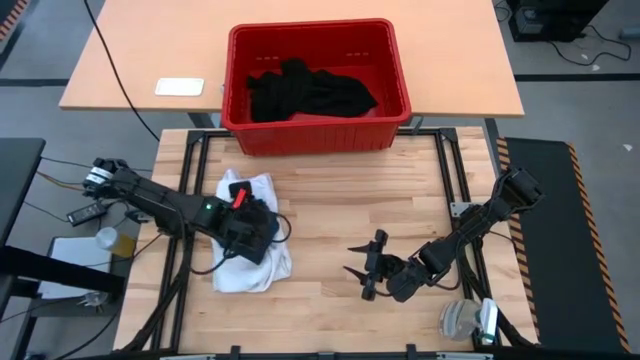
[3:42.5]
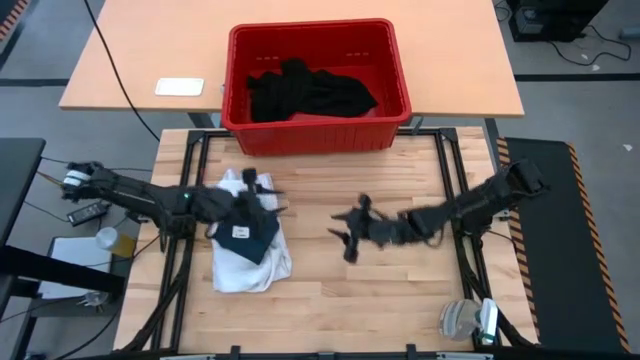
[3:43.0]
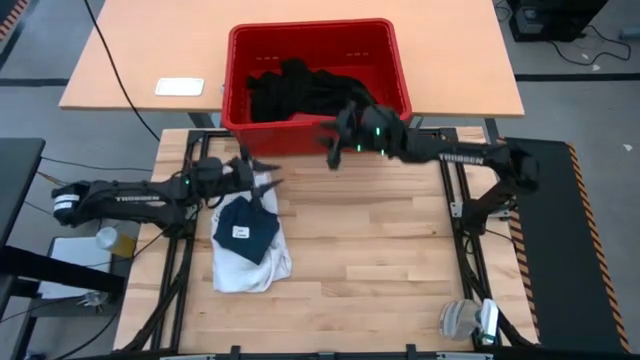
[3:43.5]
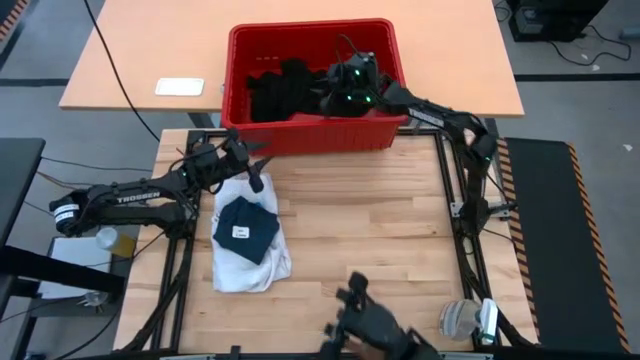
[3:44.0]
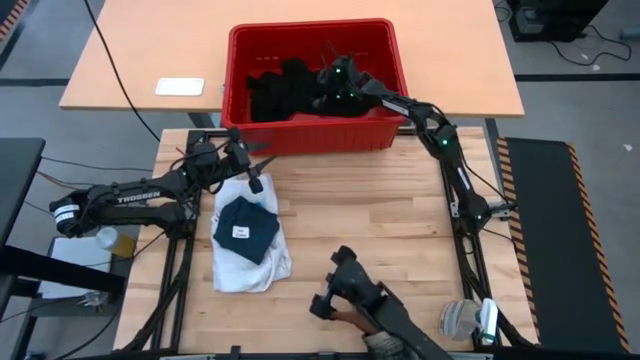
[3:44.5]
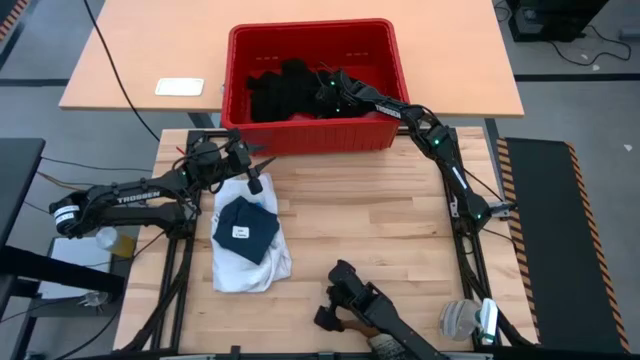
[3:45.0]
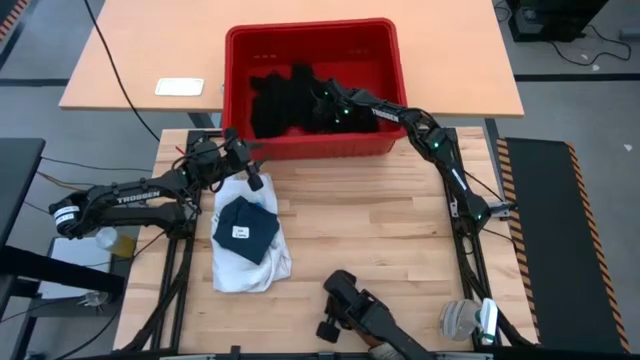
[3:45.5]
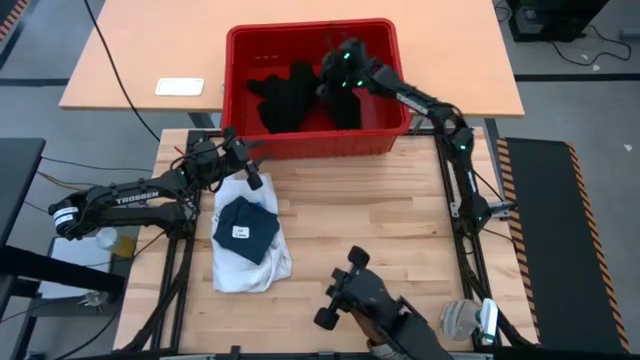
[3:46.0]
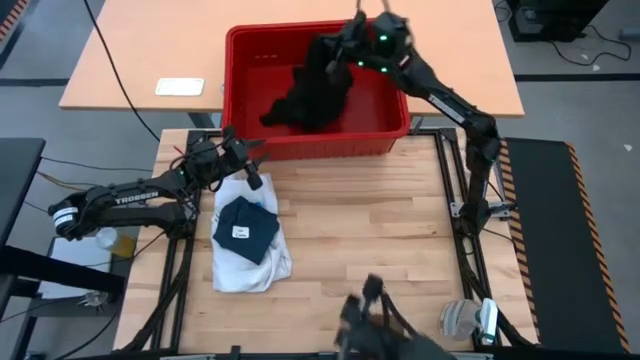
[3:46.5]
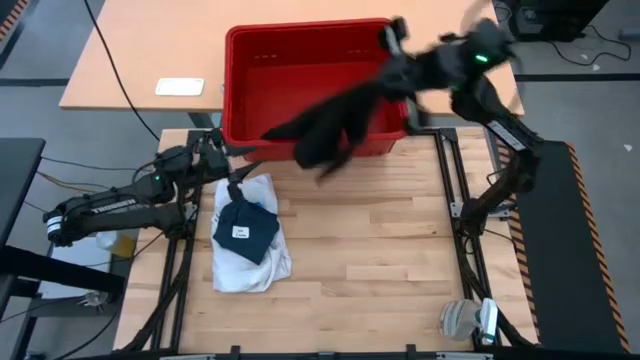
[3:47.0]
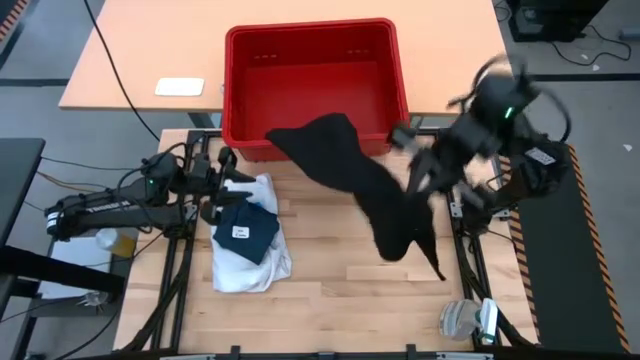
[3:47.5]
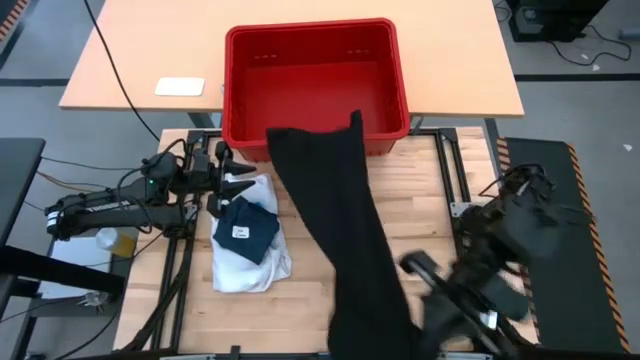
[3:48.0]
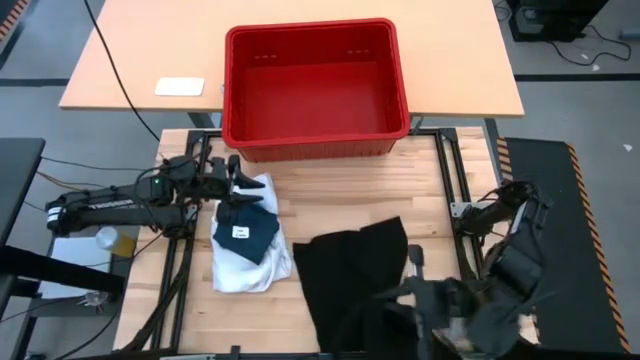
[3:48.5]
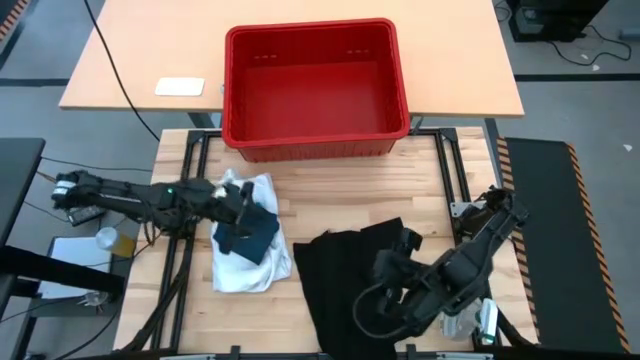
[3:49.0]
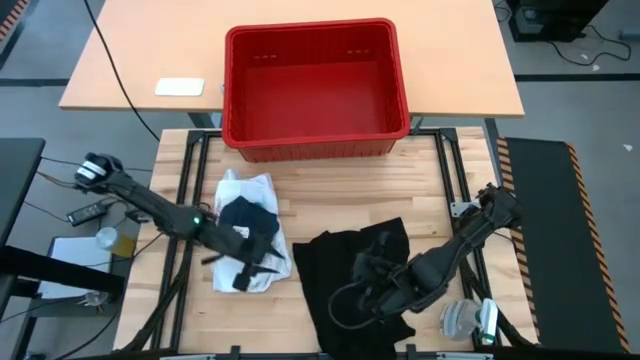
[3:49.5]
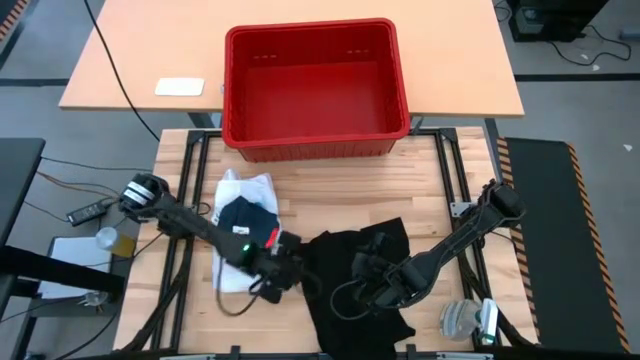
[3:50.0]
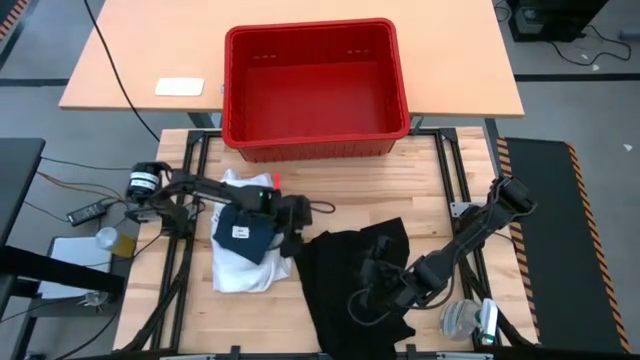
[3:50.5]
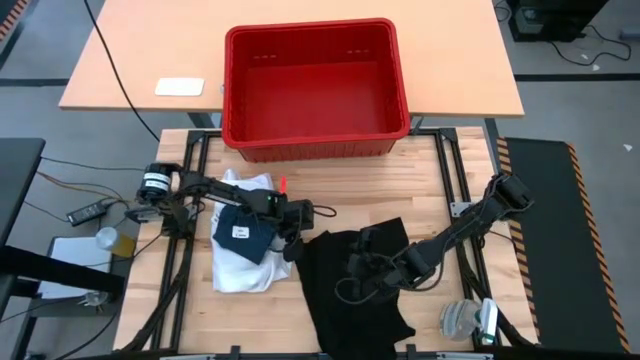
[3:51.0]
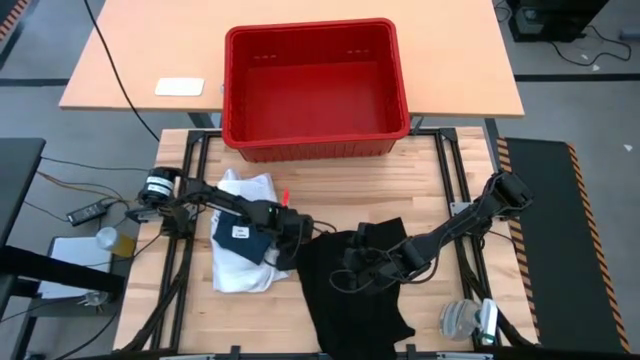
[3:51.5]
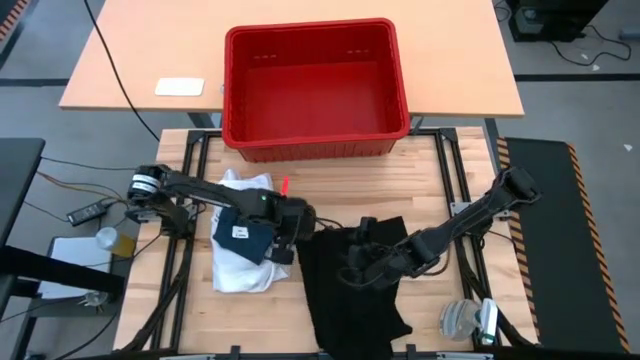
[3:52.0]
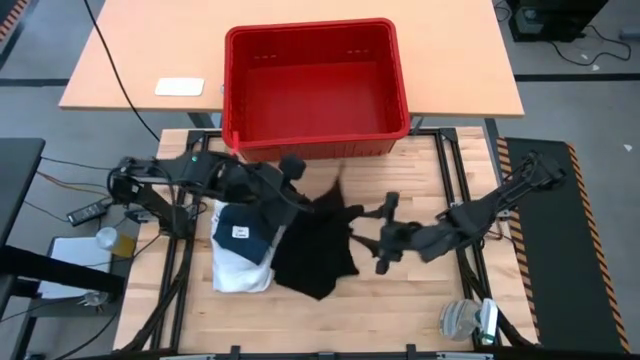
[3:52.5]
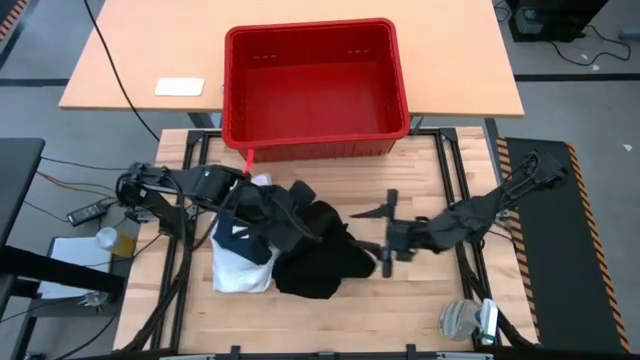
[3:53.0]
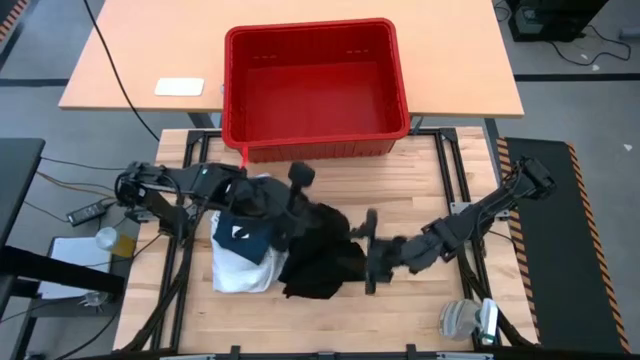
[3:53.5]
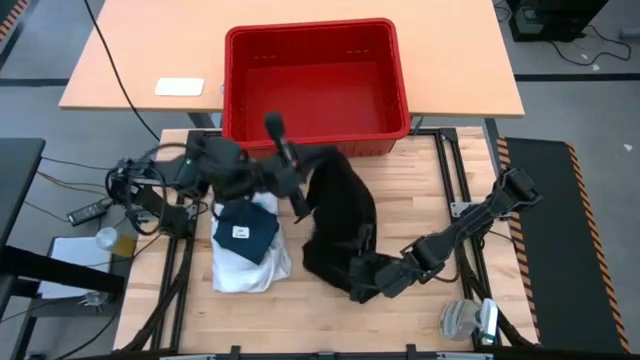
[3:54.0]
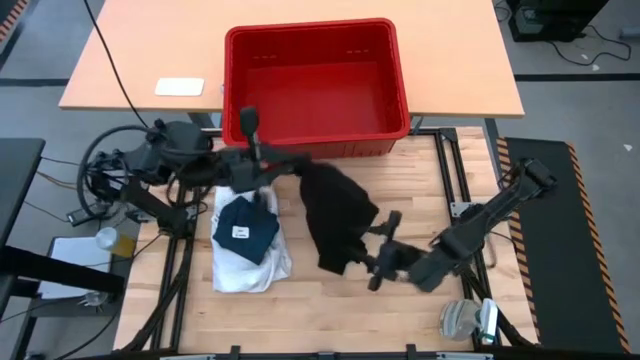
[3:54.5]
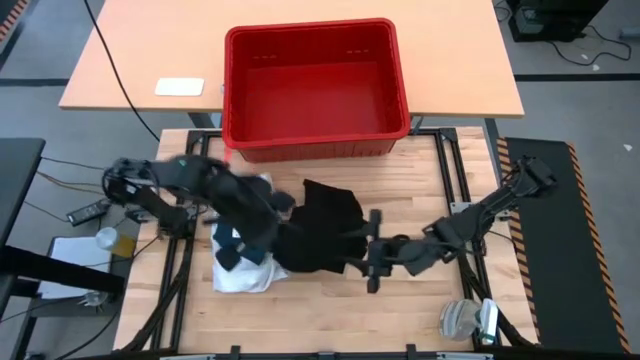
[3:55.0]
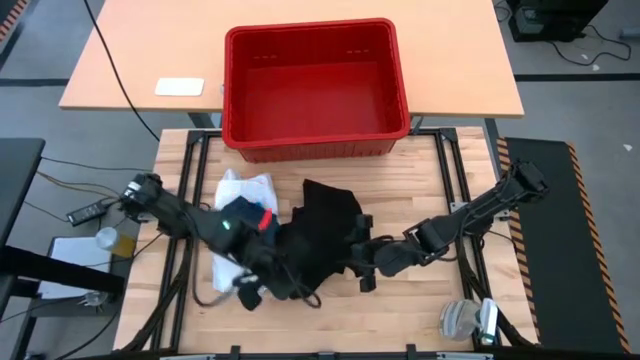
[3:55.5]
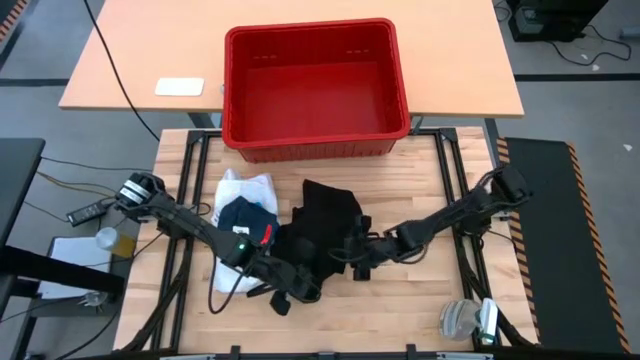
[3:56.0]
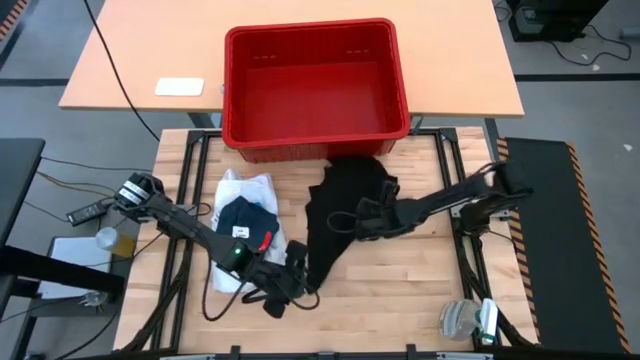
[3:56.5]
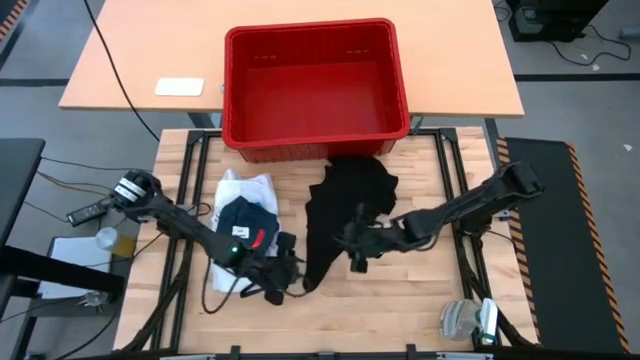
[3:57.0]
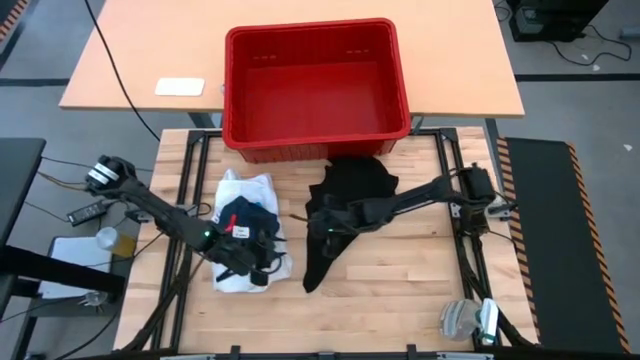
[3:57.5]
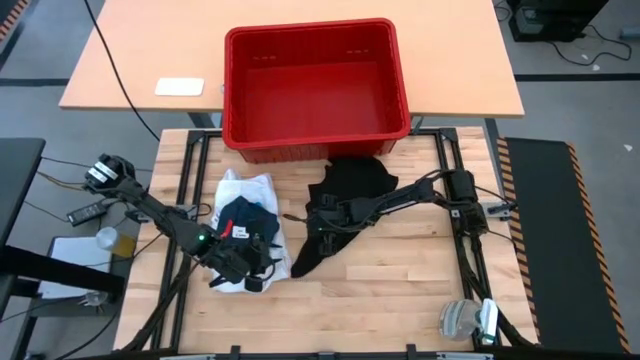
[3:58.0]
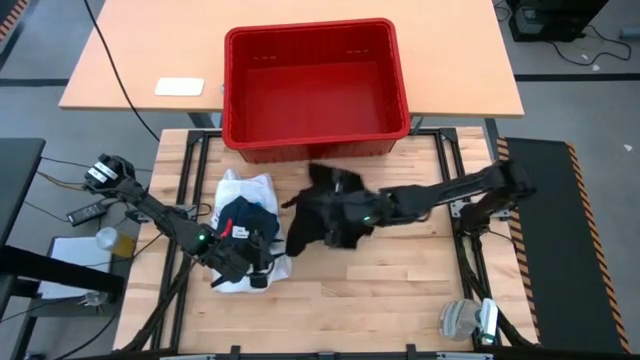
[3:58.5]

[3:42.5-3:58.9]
Task: Fold laundry
Fold the black shirt

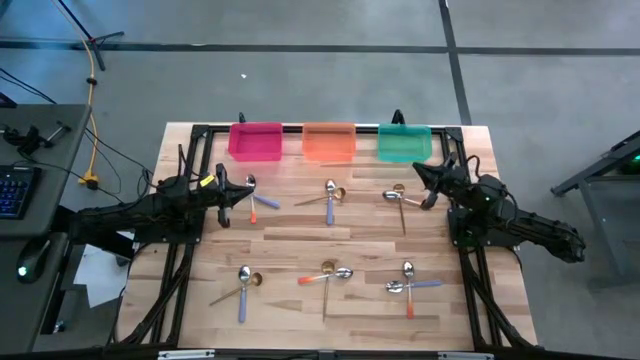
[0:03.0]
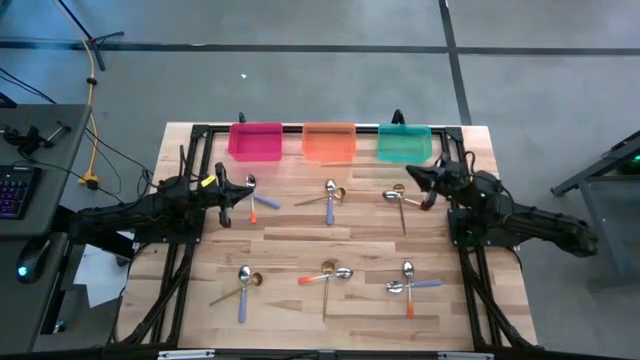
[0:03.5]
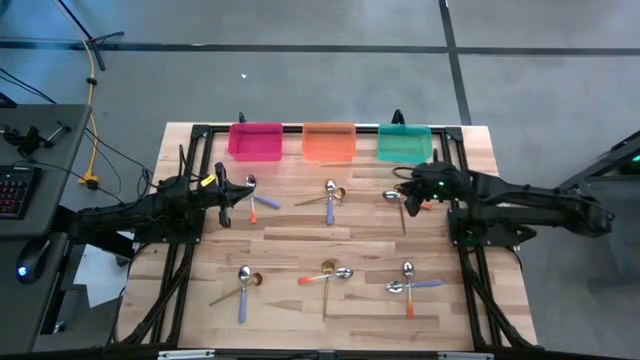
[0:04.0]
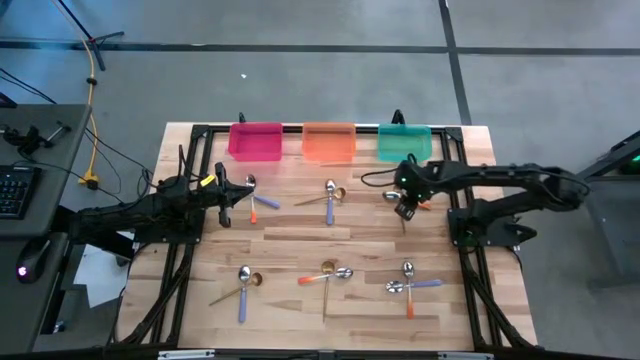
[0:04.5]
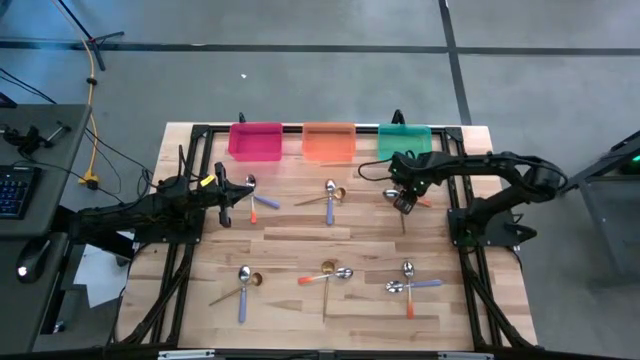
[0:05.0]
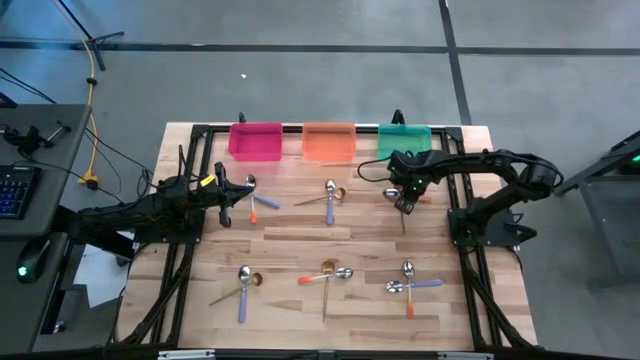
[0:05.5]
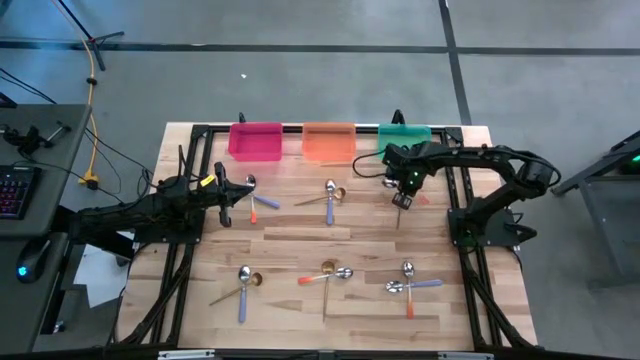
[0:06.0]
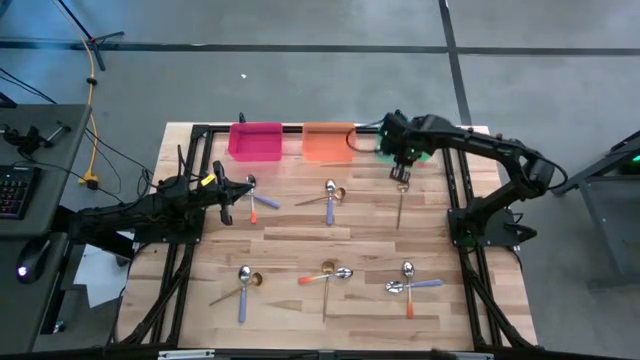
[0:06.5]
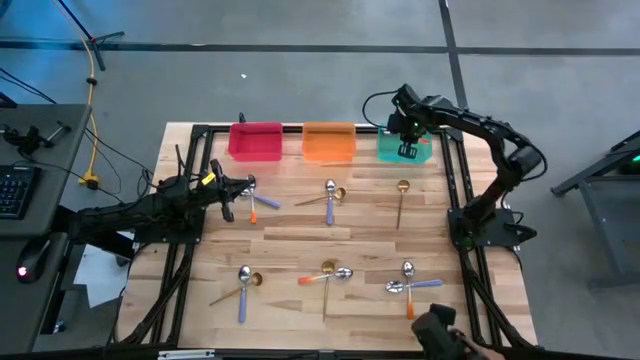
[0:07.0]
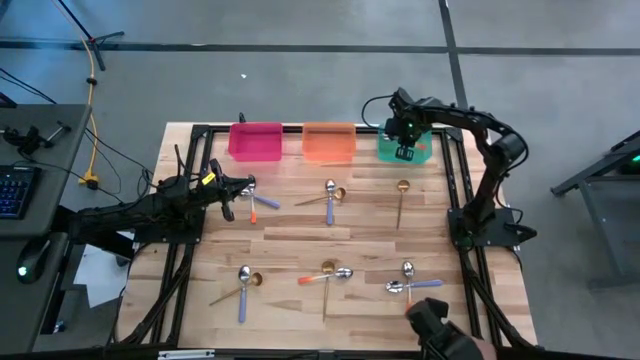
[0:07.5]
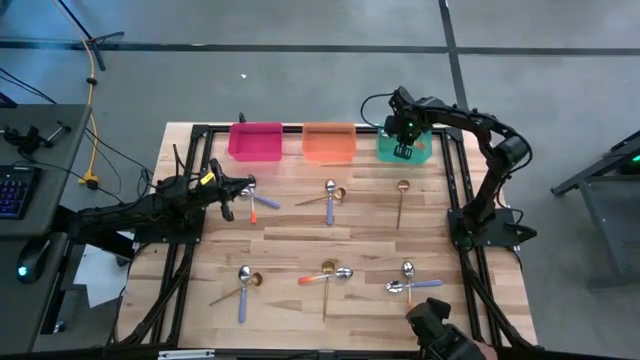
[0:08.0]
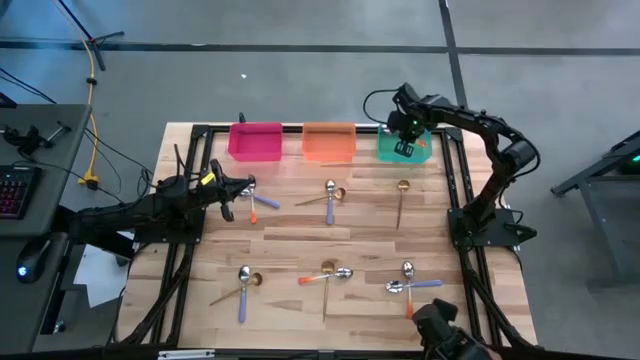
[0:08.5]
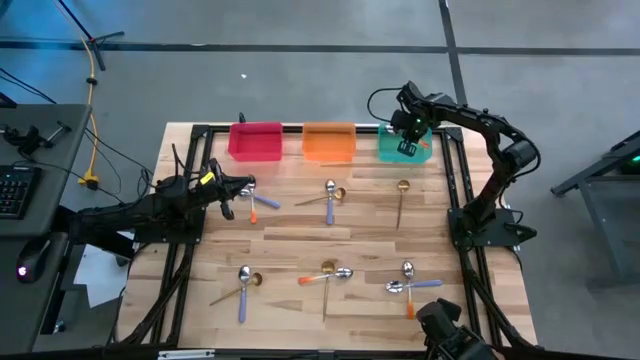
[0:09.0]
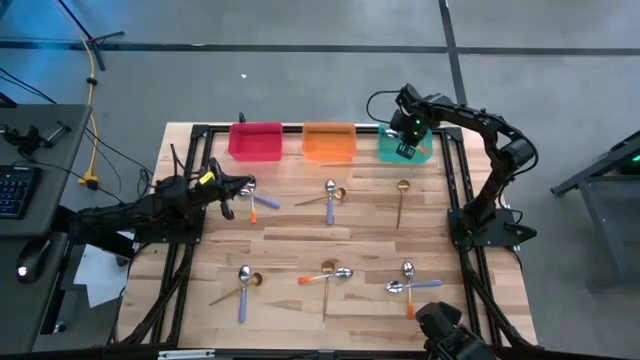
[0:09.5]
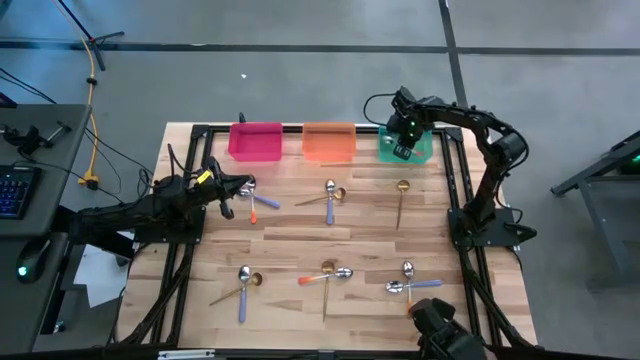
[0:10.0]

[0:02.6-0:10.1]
Task: Sort silverware by color (type)
Put the top right orange spoon into the green bin
